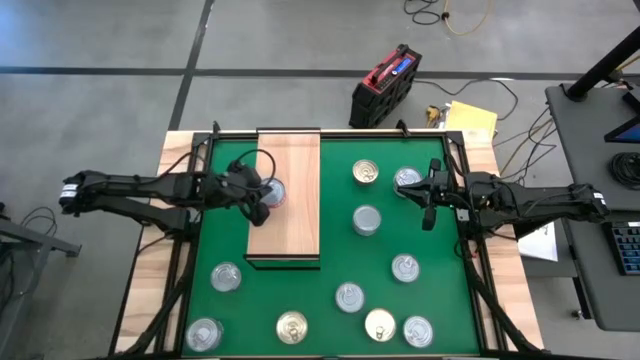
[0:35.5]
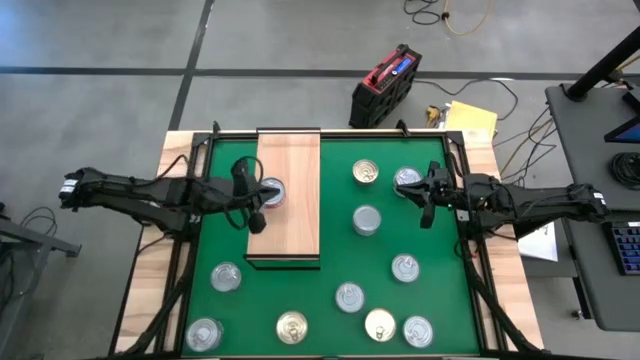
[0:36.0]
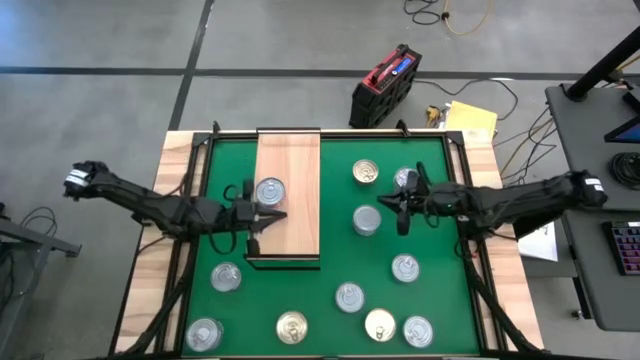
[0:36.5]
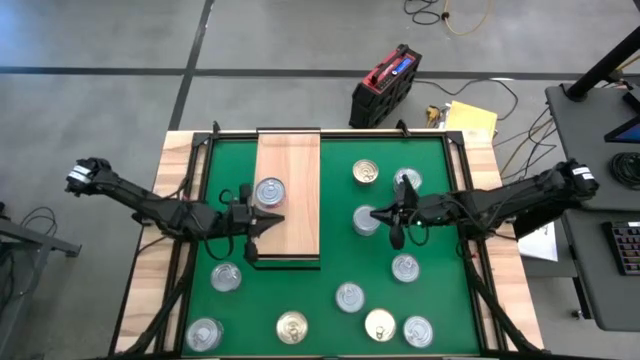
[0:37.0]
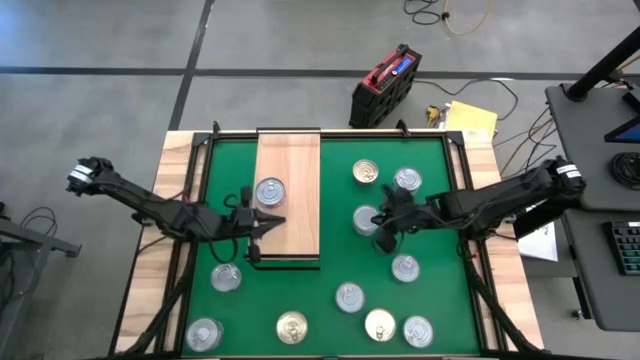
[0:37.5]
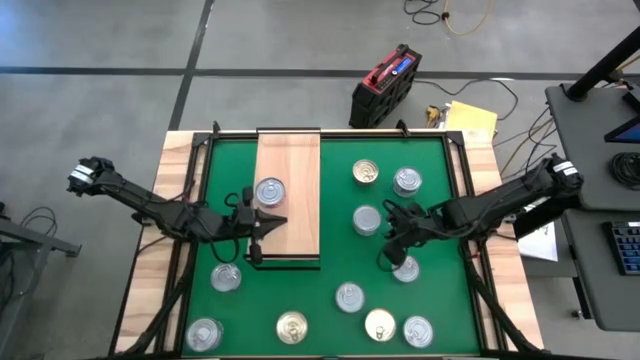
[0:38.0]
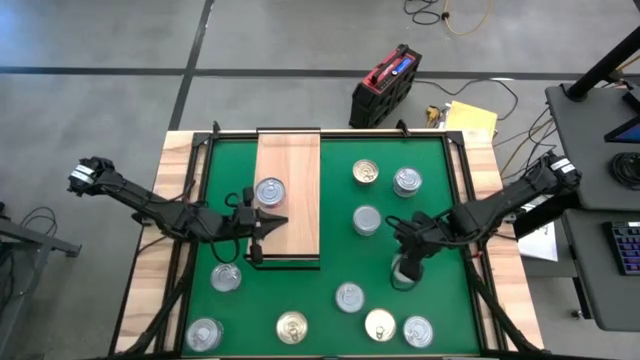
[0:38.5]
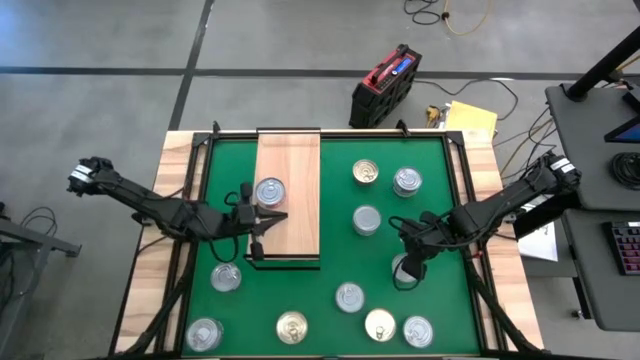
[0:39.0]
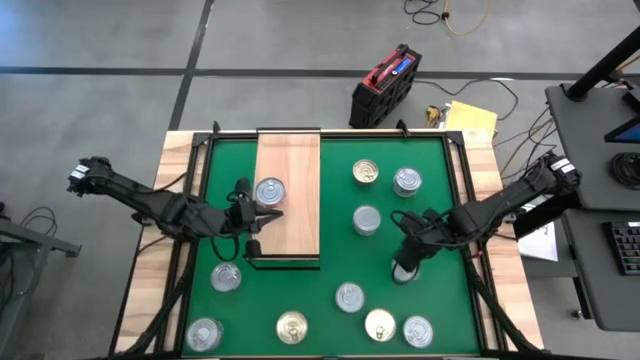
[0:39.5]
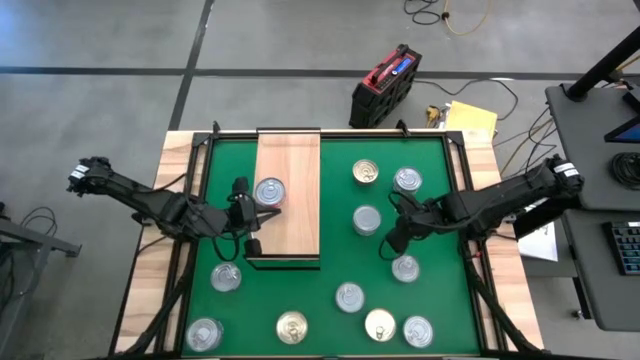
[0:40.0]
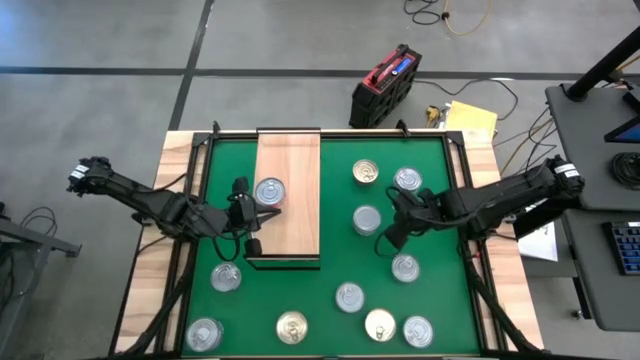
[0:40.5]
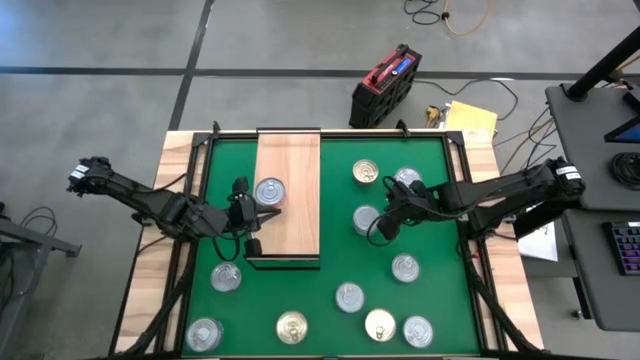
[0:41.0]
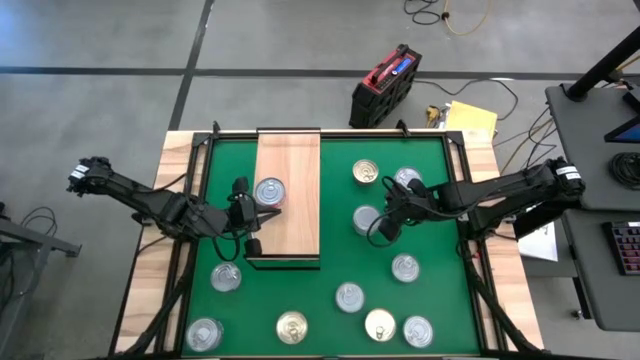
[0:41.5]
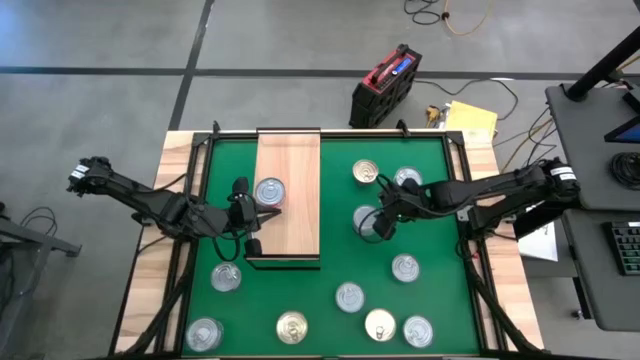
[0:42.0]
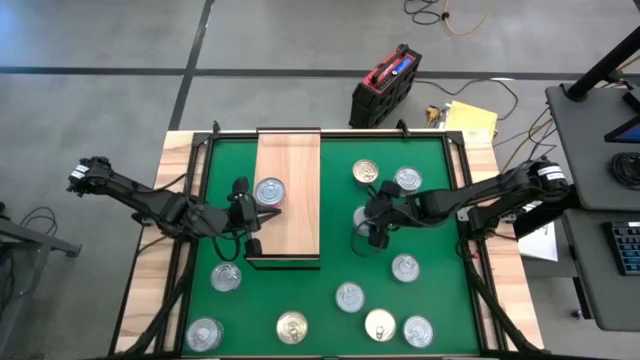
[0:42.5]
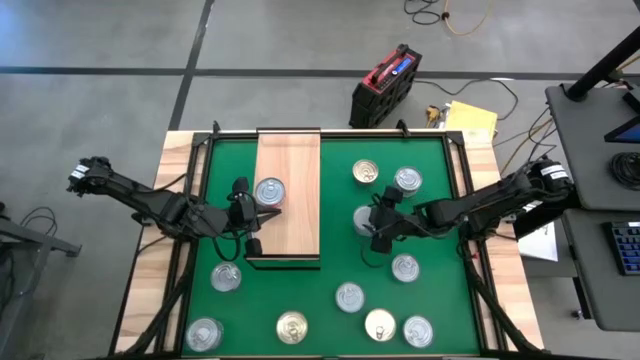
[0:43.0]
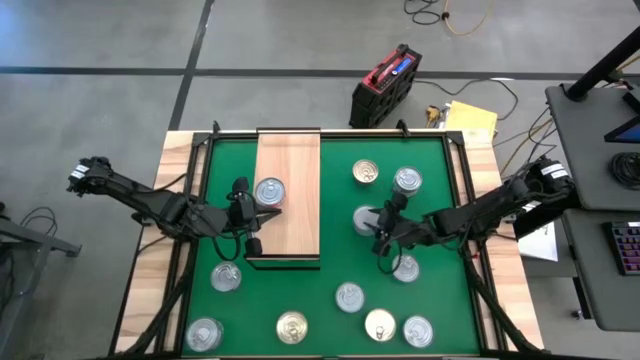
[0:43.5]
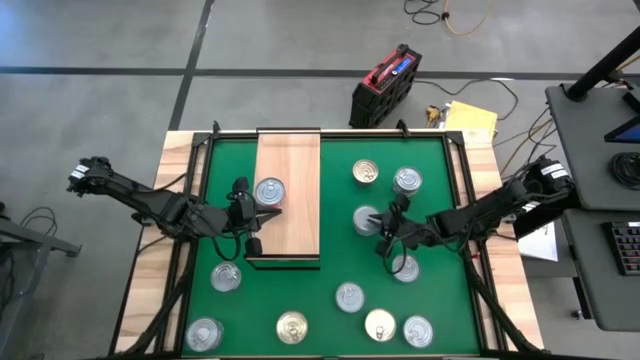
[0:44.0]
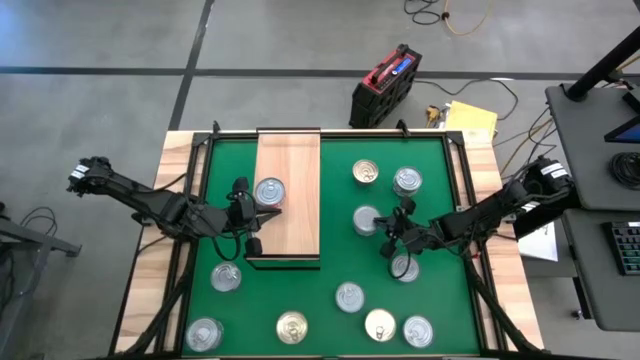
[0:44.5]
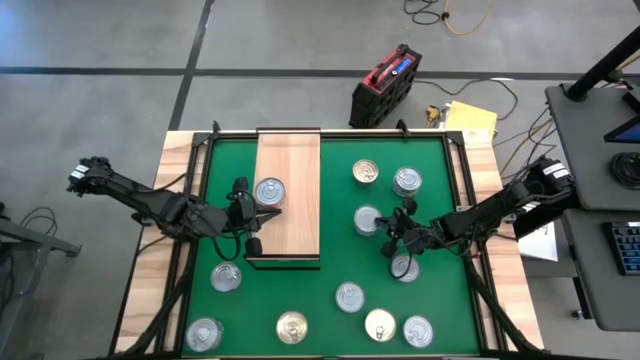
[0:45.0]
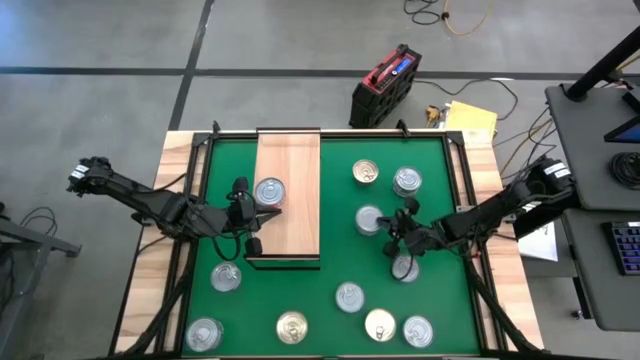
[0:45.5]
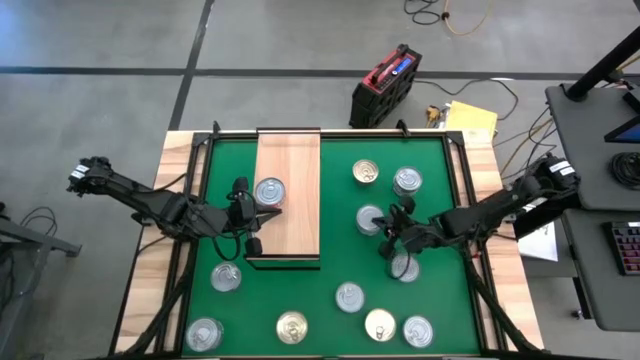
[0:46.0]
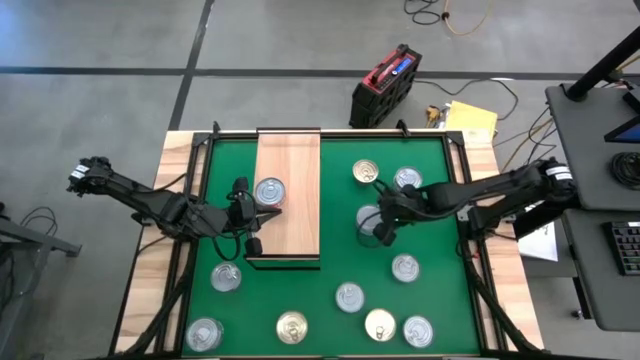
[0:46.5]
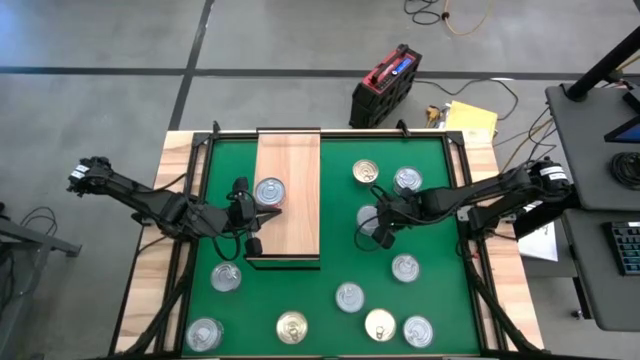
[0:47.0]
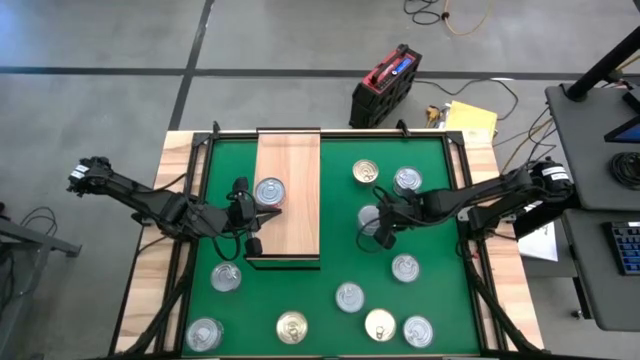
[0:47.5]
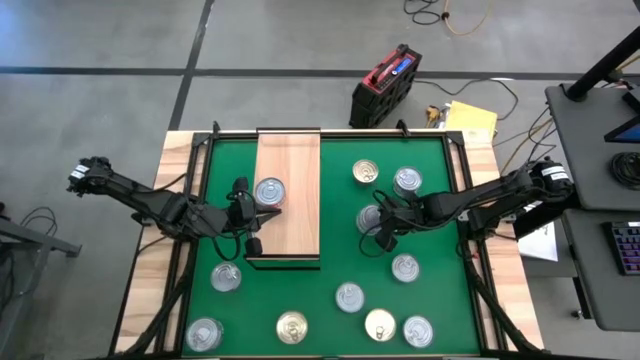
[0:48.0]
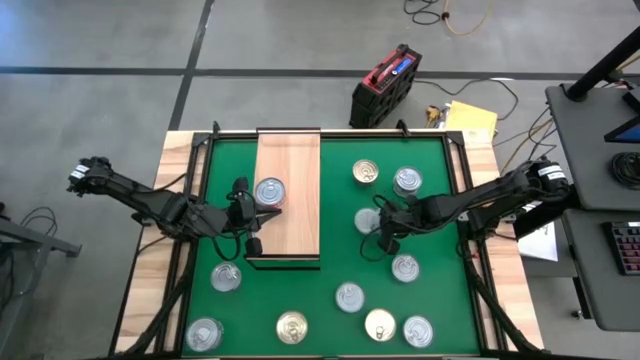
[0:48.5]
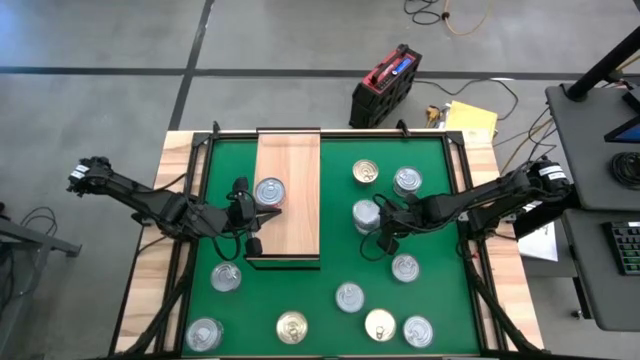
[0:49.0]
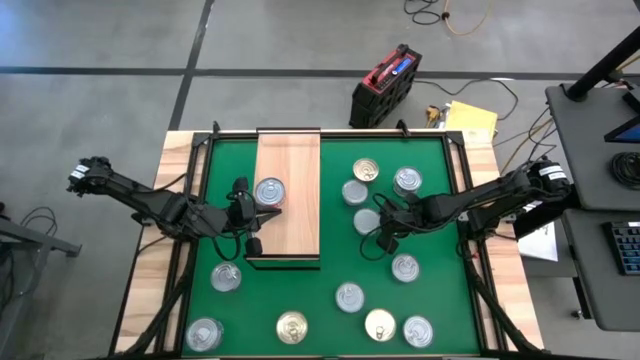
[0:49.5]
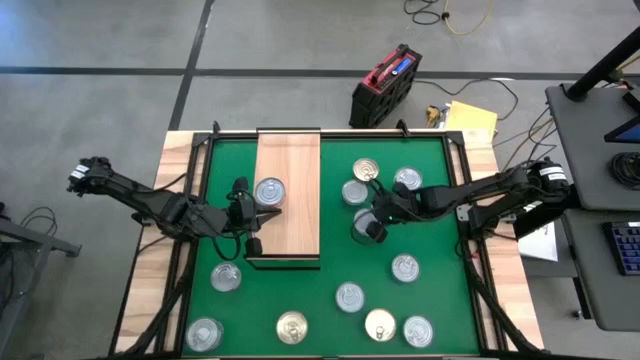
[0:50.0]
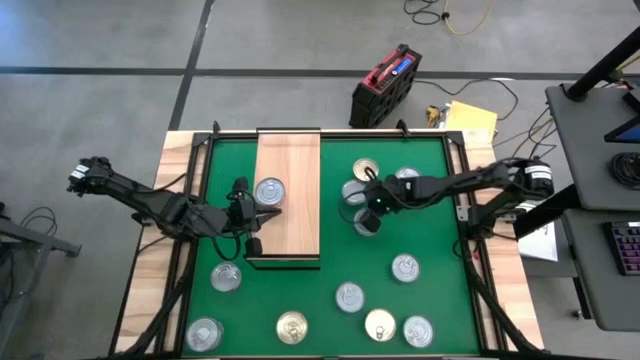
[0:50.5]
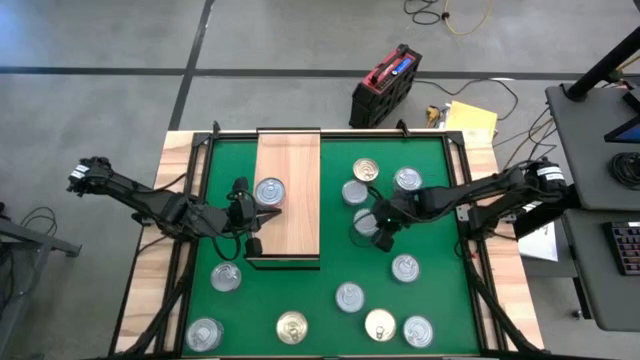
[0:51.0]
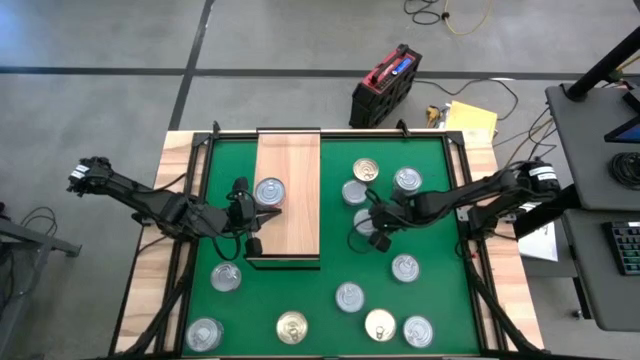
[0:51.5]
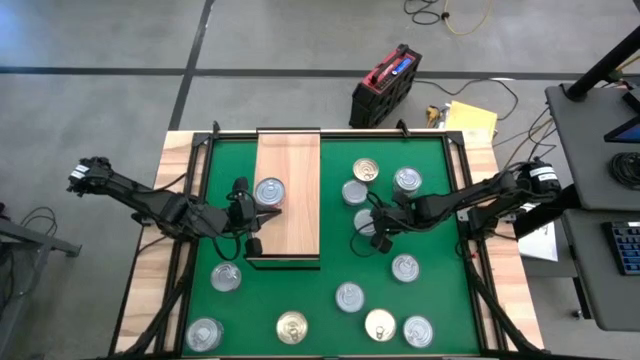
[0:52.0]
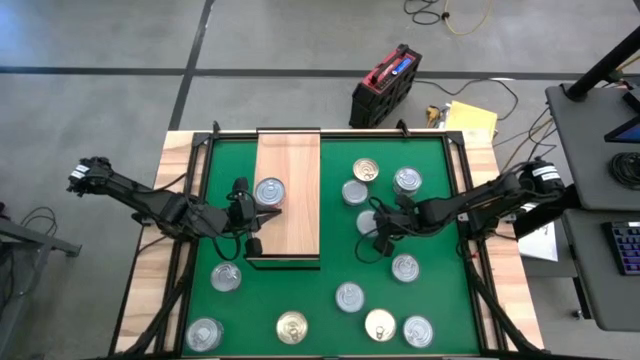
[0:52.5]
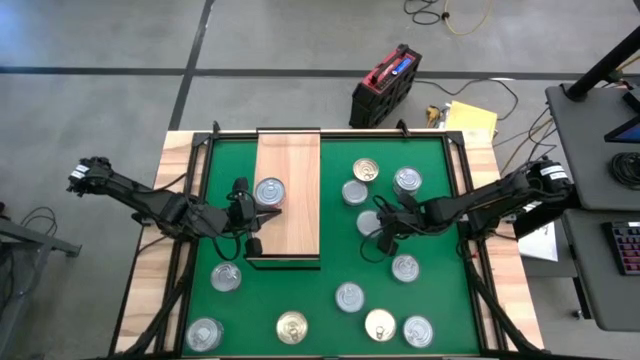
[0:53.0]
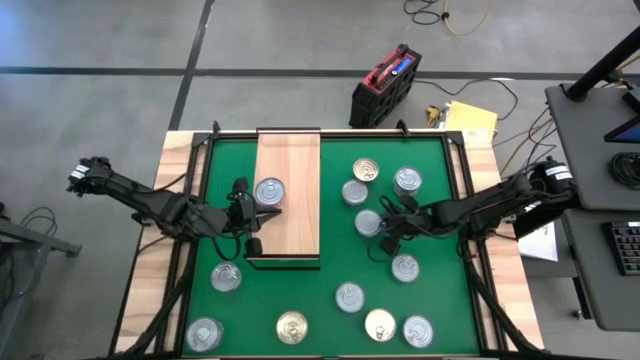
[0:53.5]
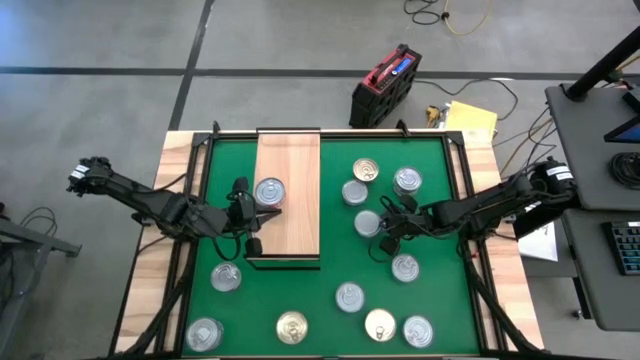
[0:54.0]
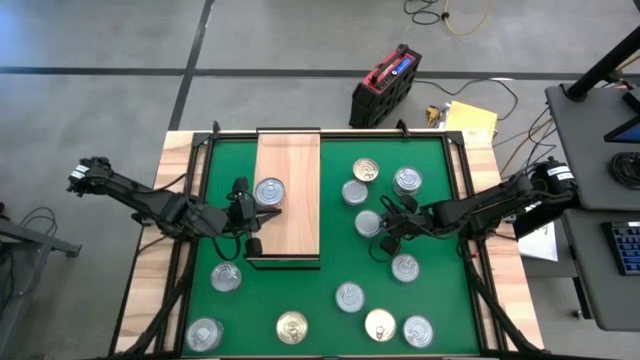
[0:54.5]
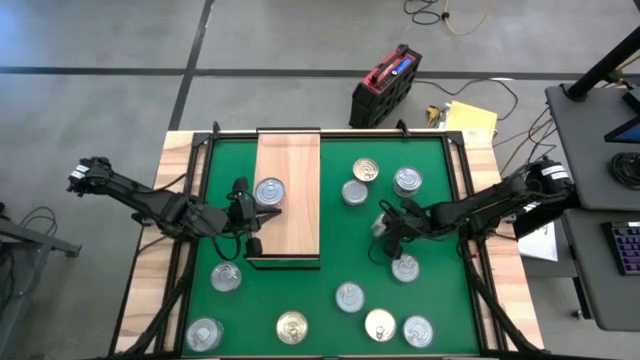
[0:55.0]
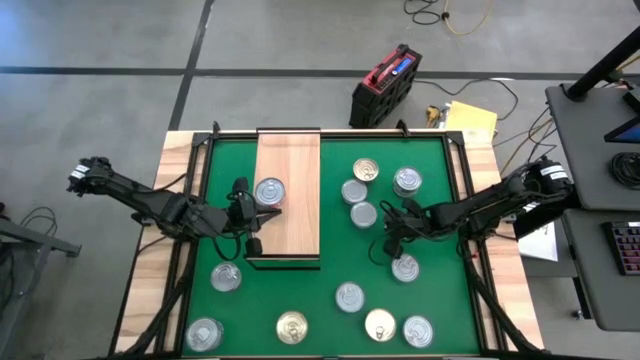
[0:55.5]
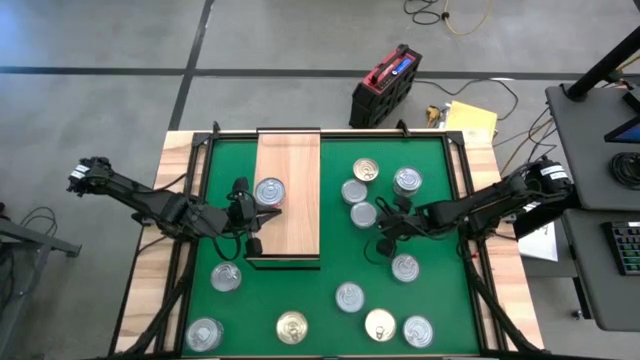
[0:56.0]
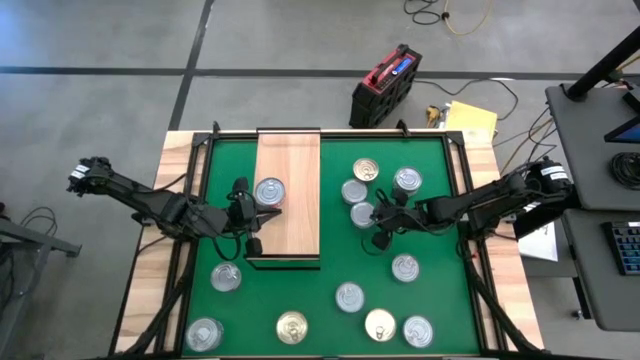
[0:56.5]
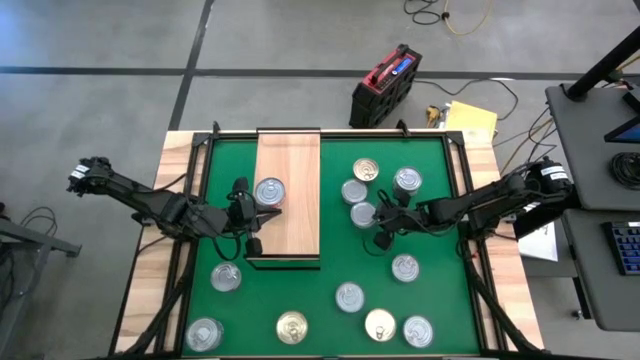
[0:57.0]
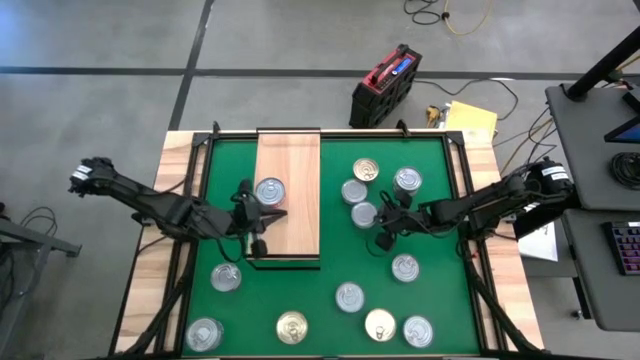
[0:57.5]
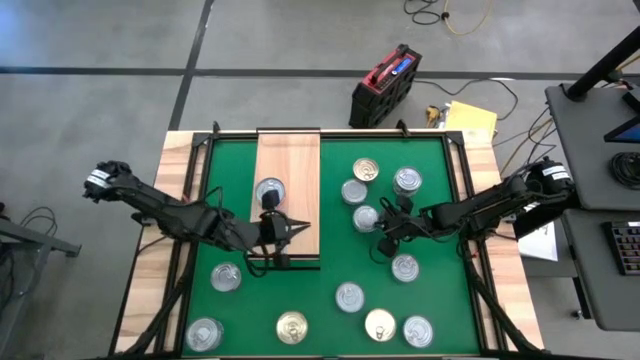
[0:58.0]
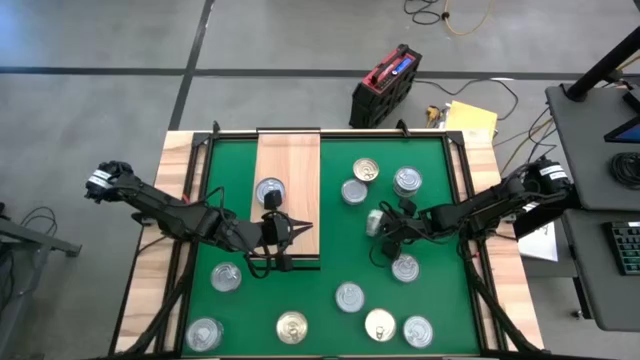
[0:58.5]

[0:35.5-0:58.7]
Task: Stack canned seafood by type on shelf
Put the green and white tuna can on the shelf
